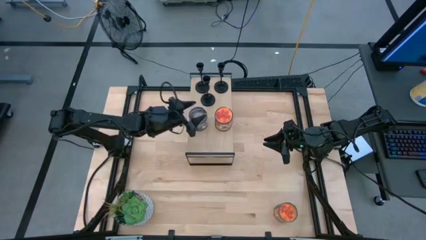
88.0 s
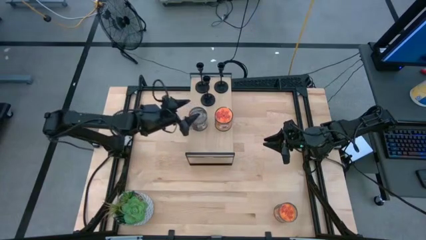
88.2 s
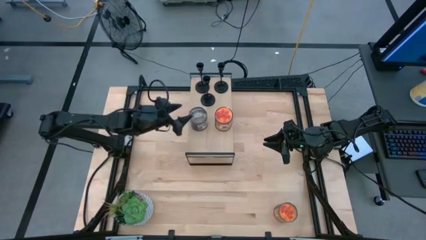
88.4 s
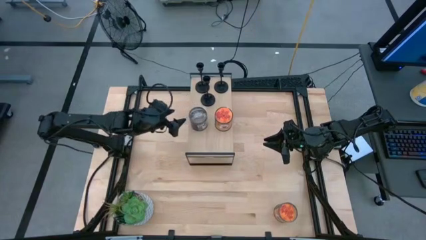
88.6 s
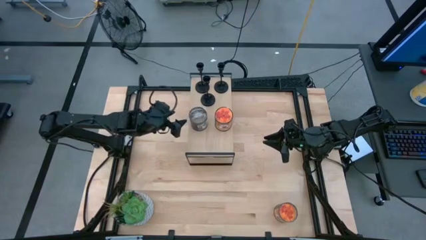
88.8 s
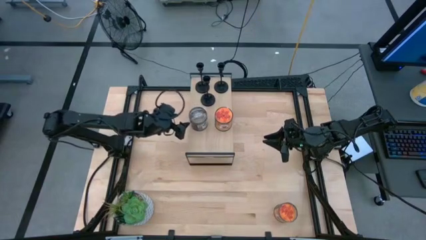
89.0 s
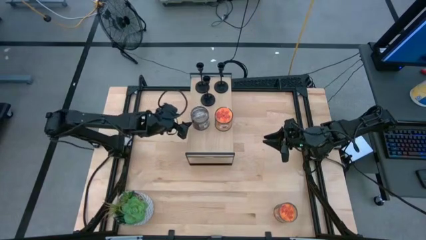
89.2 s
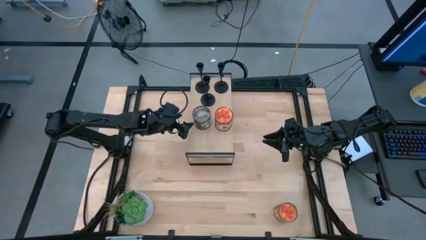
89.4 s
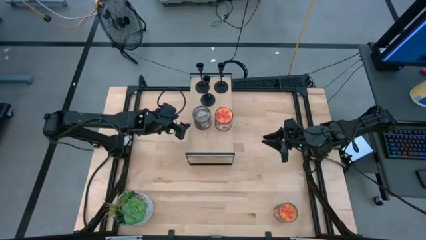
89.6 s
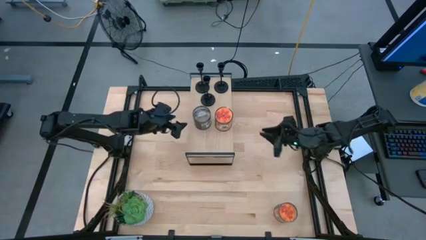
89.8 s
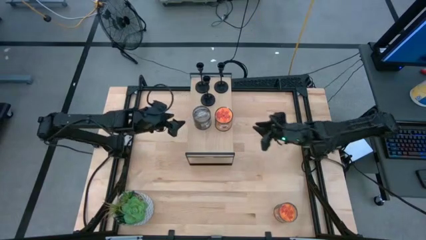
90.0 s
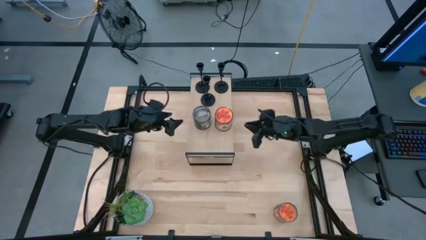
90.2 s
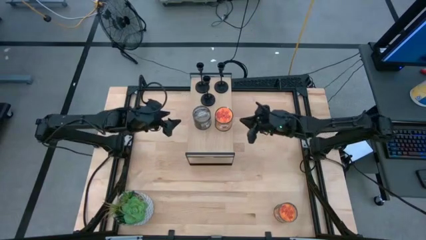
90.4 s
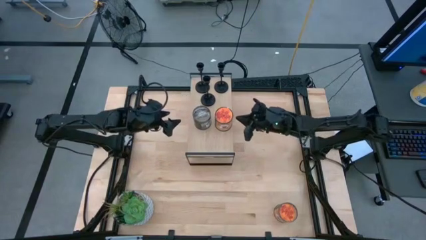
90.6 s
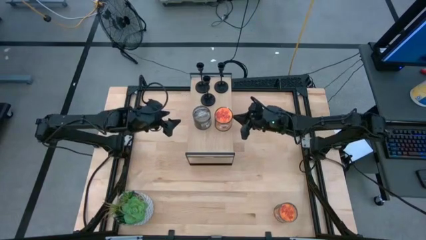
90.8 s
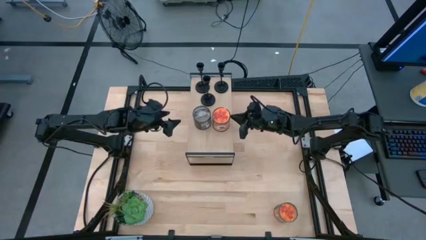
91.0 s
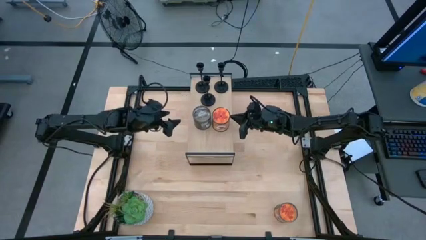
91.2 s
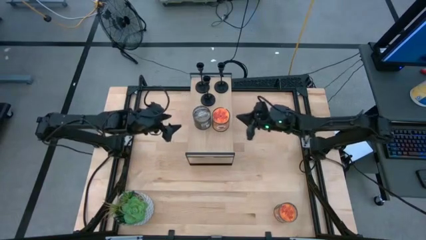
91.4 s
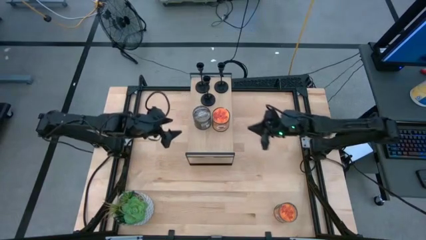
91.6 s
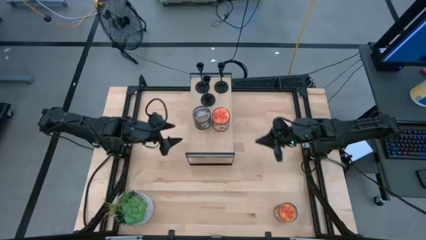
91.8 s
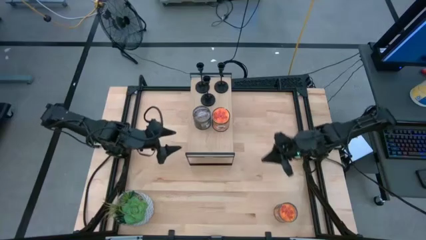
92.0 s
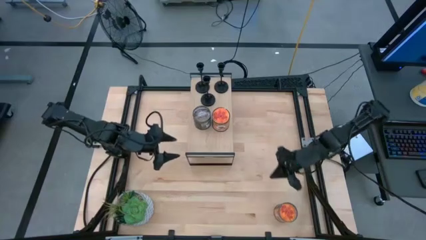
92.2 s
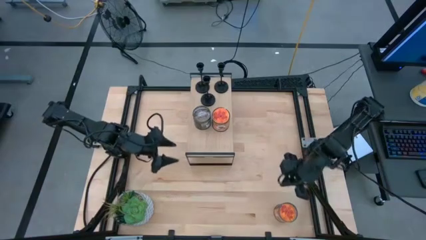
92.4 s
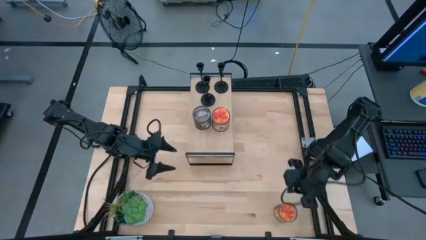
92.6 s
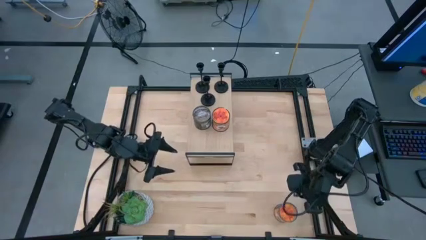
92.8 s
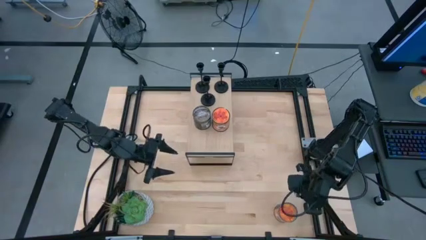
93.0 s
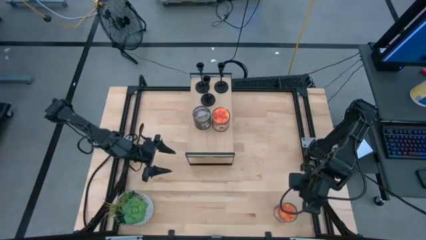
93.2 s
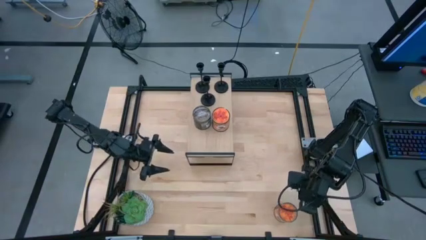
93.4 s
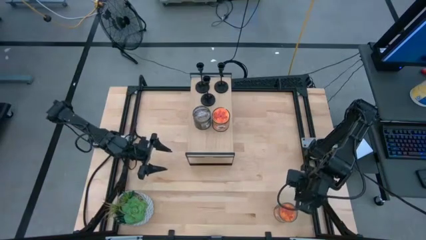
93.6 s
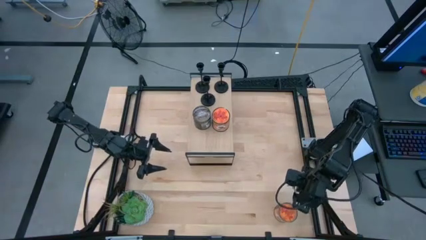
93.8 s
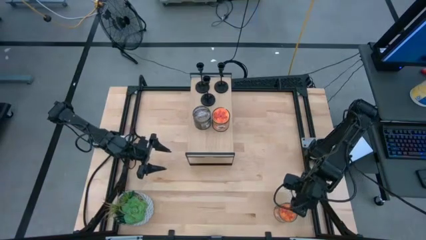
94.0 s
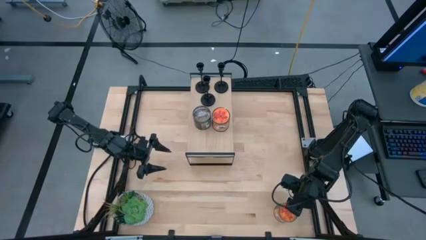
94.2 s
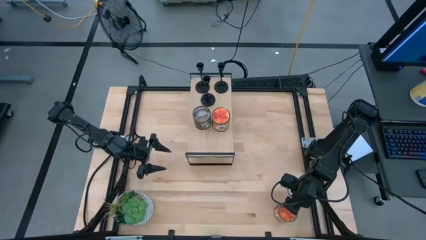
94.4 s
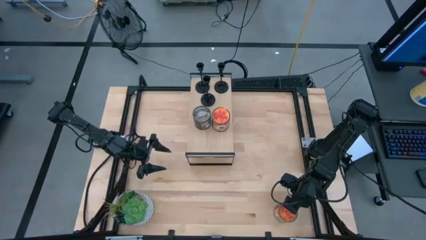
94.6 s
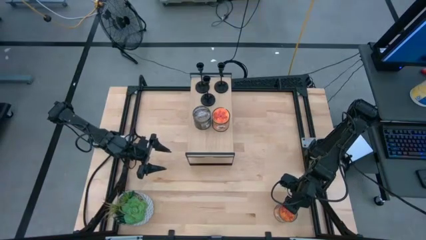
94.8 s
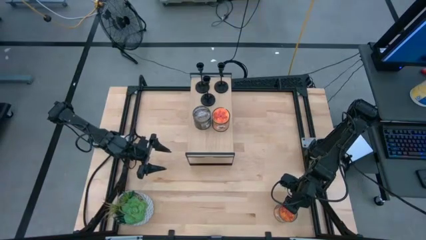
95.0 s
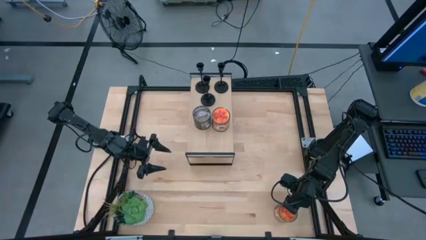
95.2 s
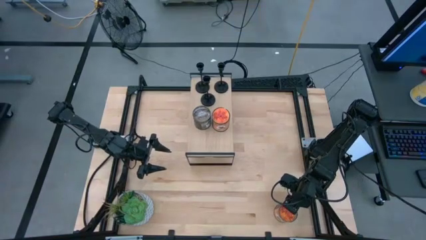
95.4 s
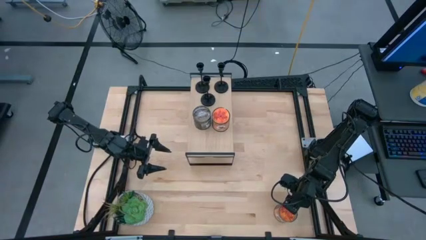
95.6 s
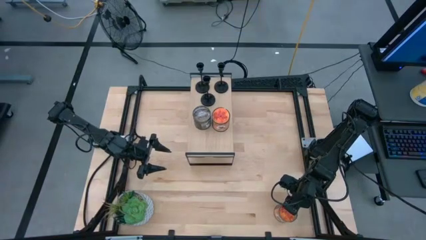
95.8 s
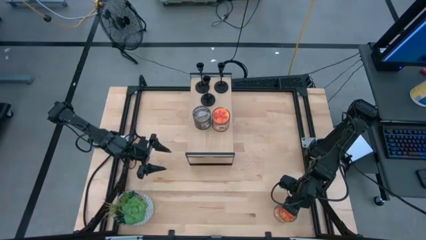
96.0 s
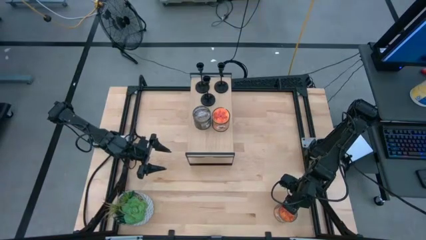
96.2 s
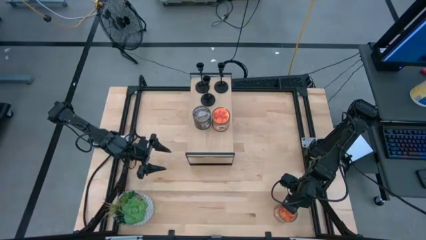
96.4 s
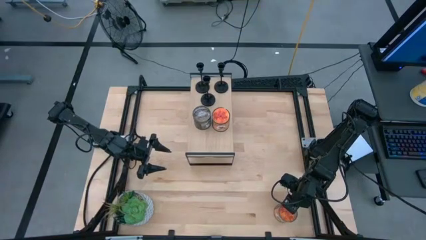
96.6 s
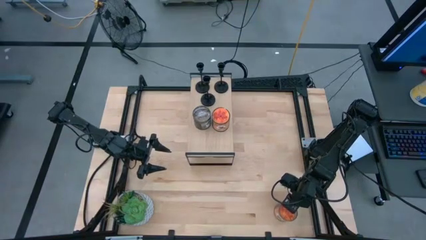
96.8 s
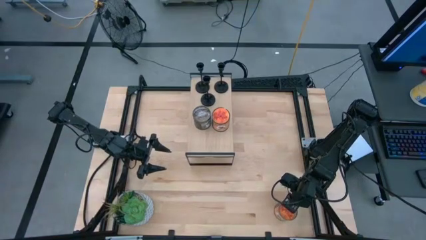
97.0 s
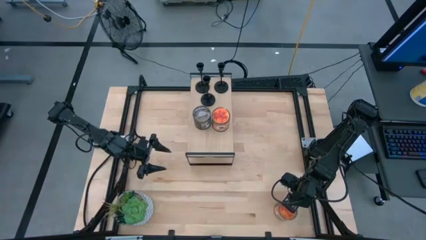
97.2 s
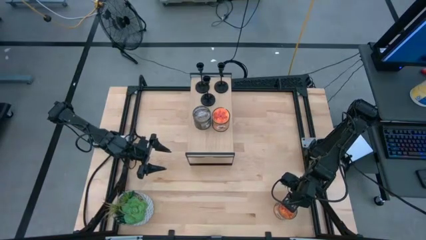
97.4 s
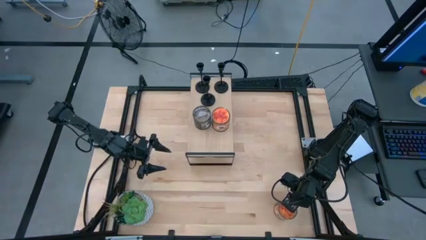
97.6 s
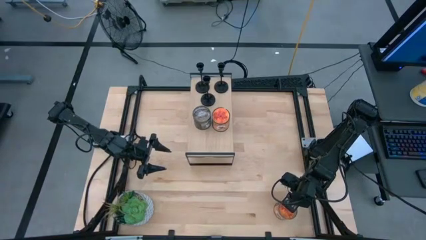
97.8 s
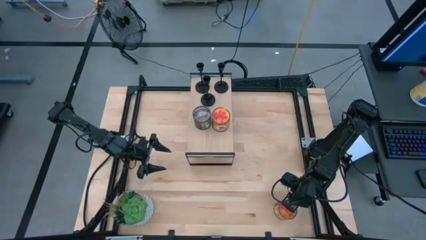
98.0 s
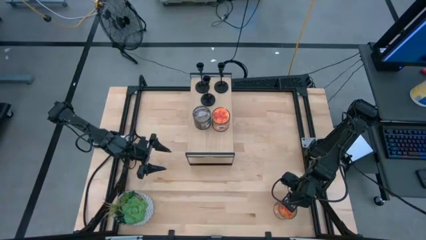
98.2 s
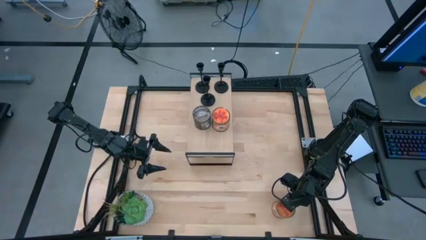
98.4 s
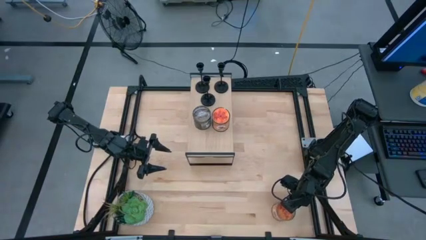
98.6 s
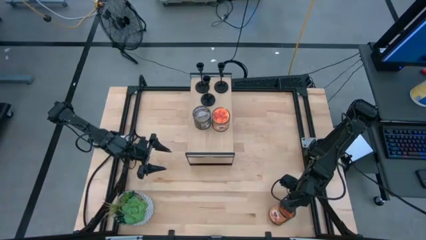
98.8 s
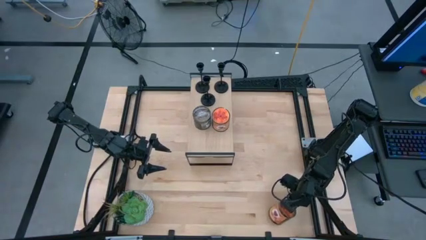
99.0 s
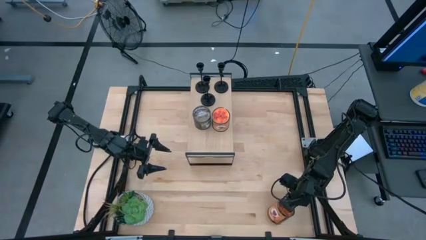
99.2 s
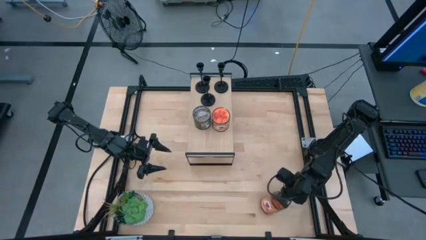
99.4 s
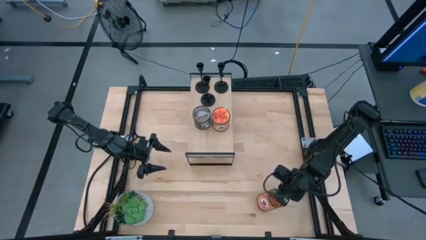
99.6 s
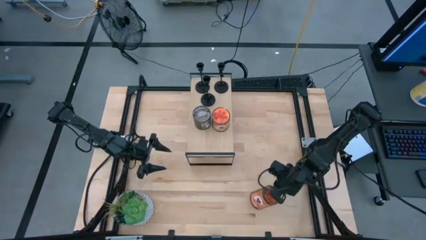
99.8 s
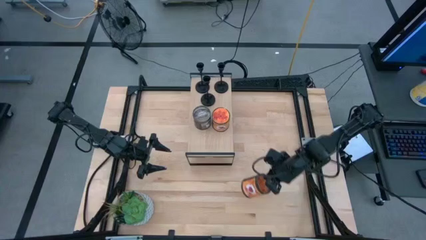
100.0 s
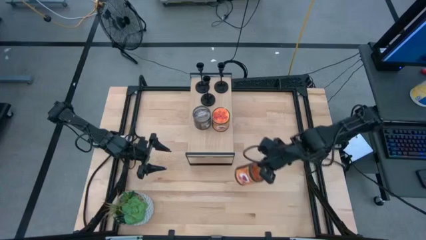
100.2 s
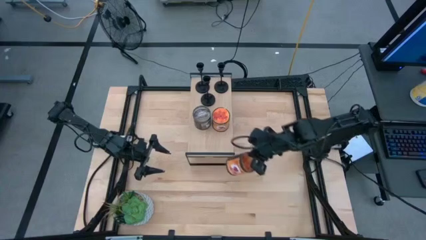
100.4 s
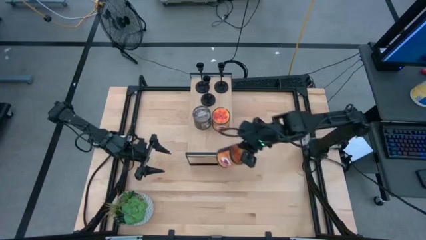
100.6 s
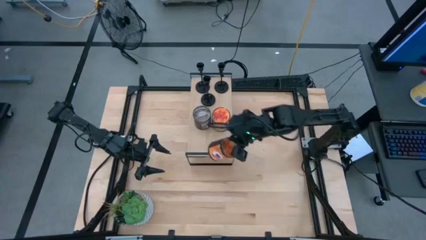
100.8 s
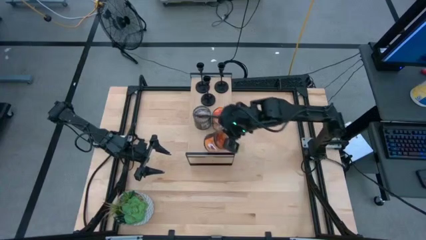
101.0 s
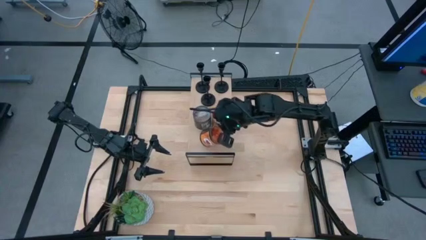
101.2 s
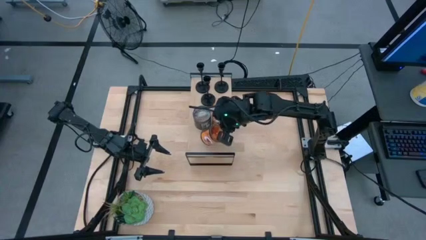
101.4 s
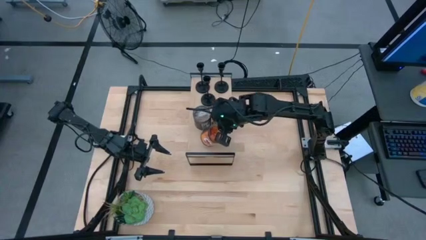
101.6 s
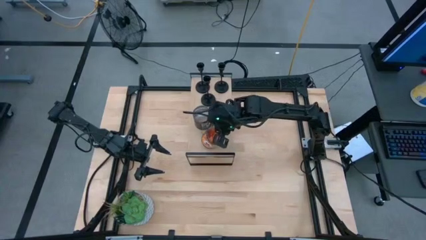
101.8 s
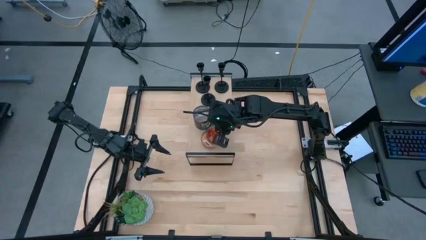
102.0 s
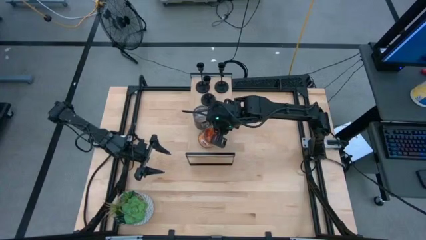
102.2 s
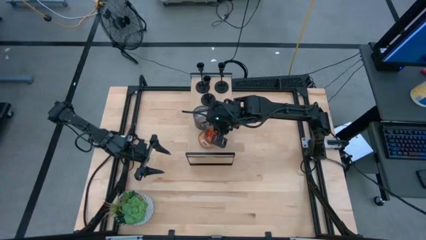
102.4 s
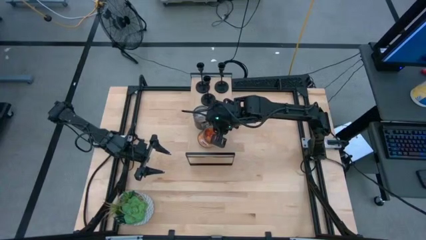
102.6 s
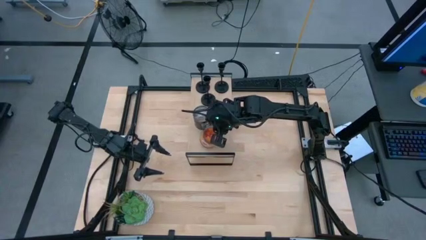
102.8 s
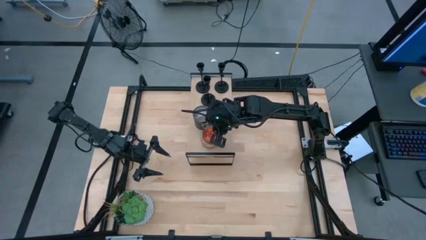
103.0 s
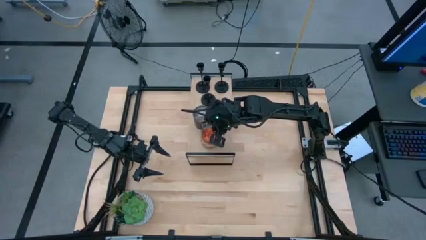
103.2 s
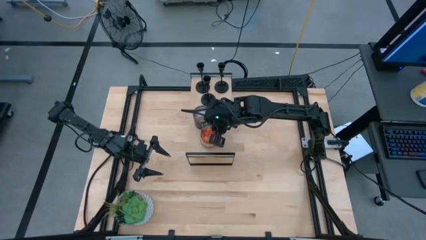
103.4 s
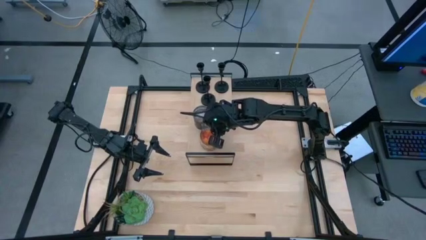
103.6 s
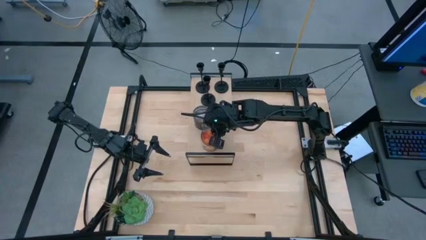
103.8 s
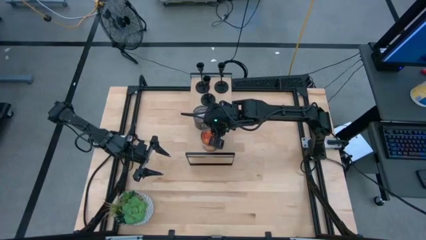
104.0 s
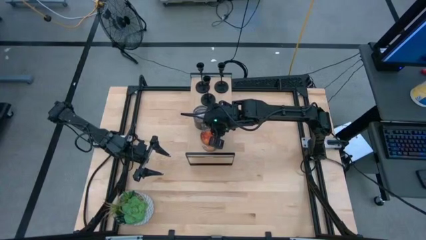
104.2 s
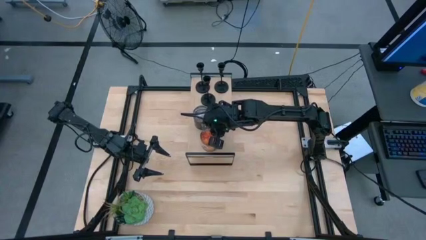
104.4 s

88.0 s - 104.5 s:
Task: Pick & Place candle stick holders
Put the orange scented candle on the shelf
